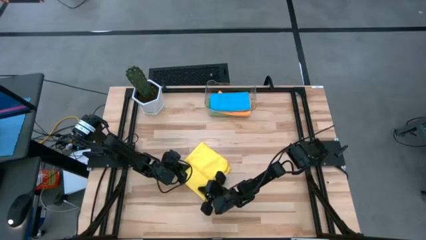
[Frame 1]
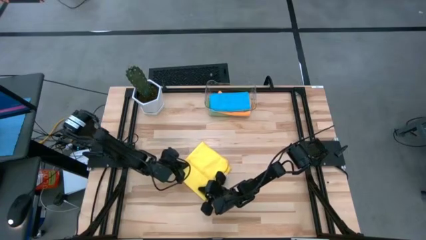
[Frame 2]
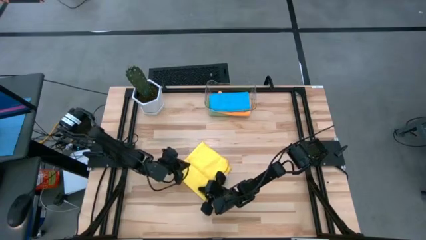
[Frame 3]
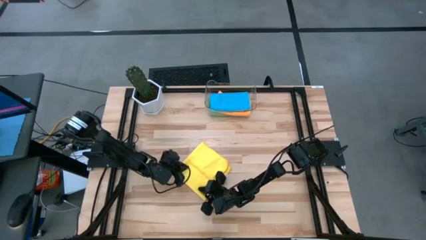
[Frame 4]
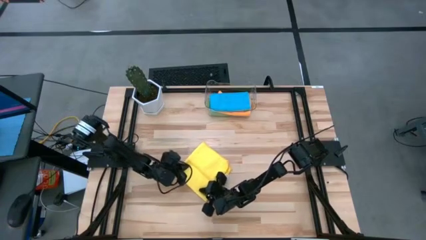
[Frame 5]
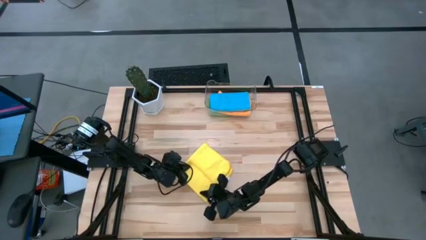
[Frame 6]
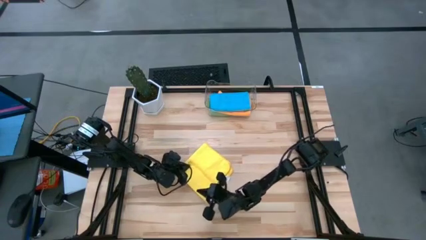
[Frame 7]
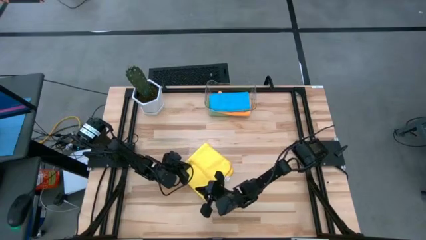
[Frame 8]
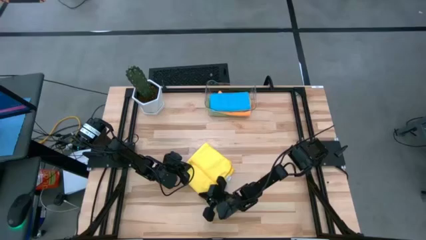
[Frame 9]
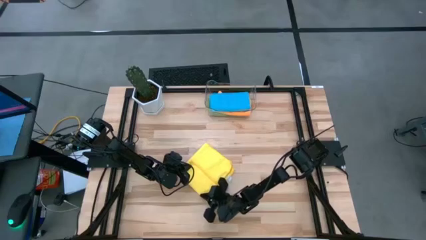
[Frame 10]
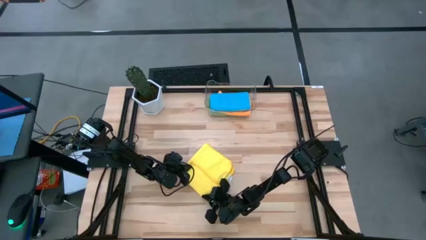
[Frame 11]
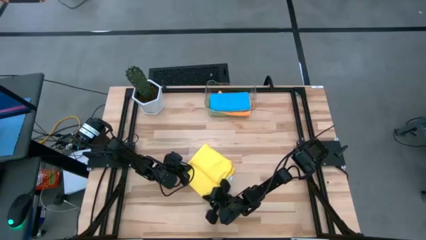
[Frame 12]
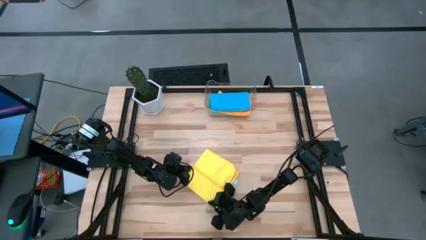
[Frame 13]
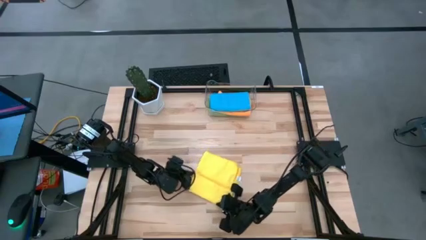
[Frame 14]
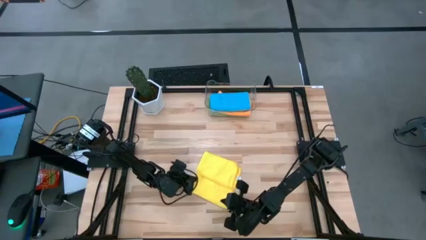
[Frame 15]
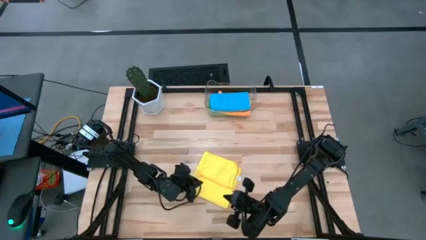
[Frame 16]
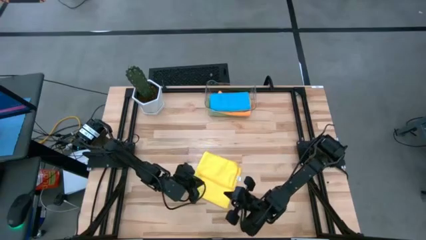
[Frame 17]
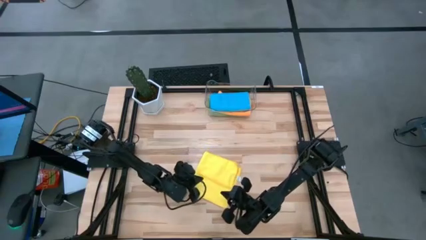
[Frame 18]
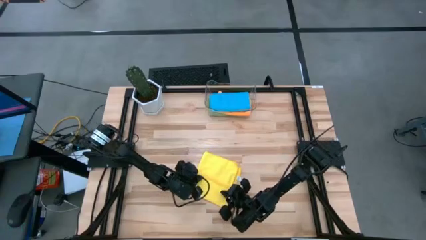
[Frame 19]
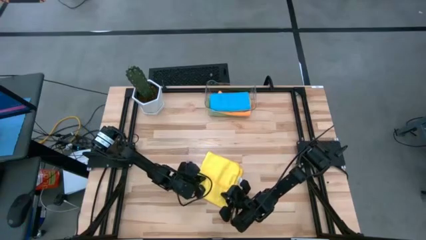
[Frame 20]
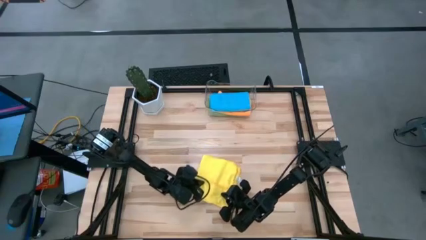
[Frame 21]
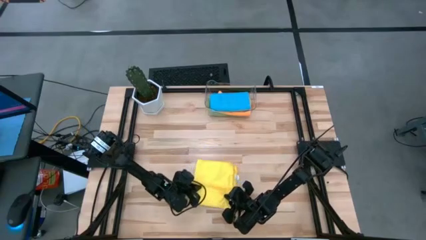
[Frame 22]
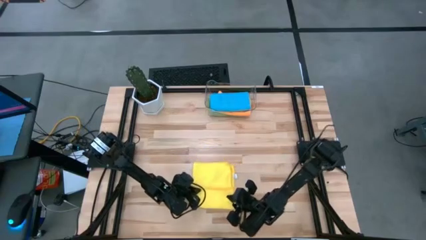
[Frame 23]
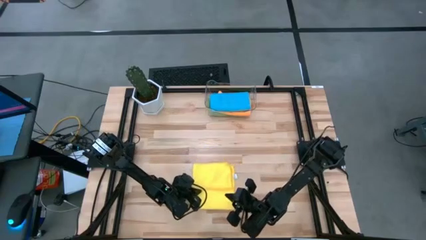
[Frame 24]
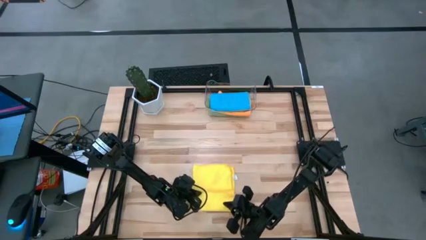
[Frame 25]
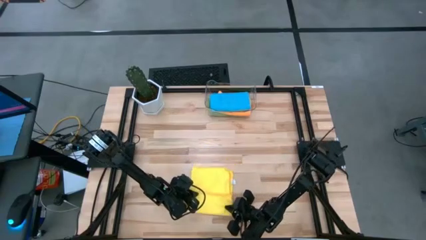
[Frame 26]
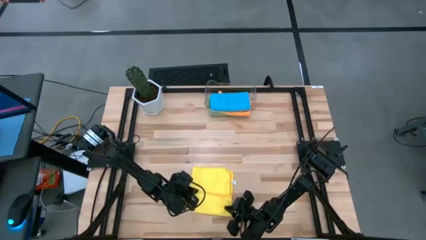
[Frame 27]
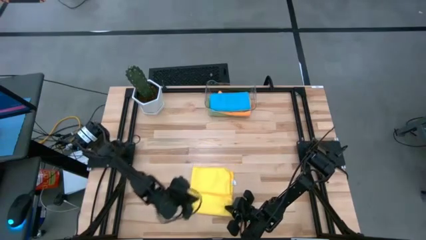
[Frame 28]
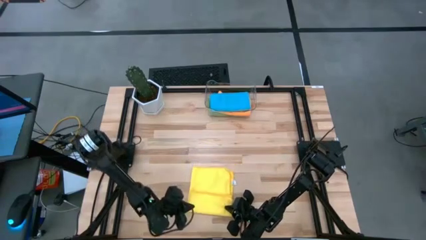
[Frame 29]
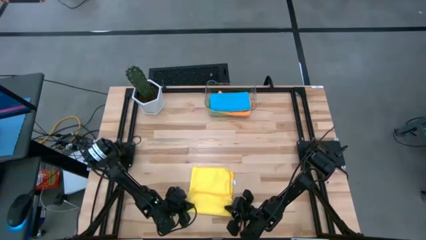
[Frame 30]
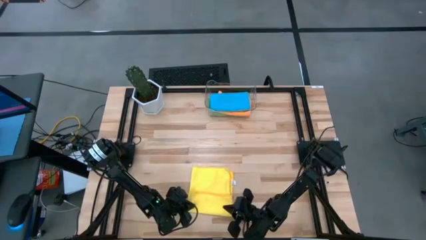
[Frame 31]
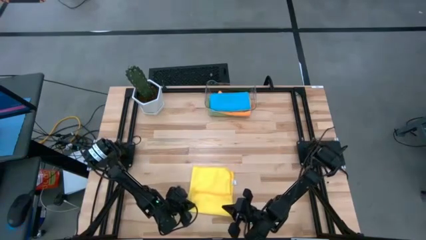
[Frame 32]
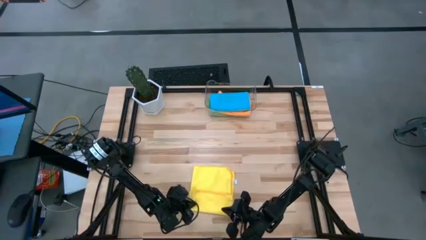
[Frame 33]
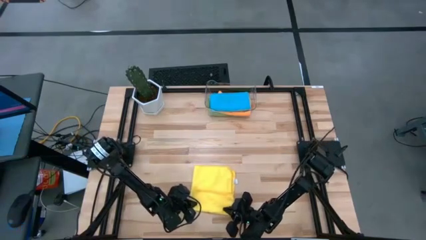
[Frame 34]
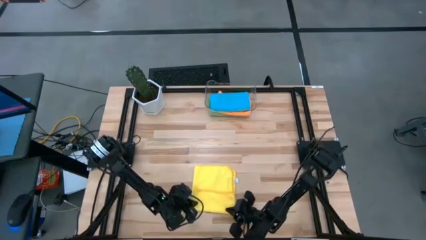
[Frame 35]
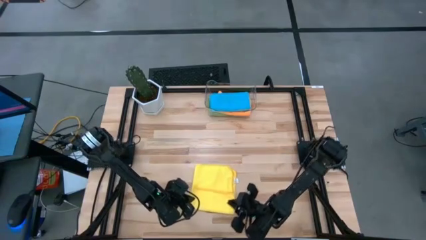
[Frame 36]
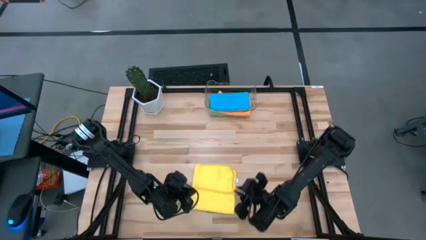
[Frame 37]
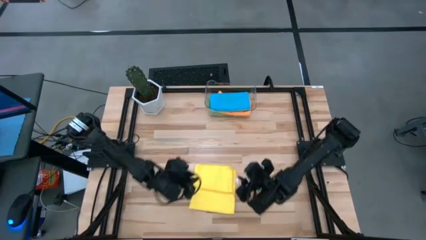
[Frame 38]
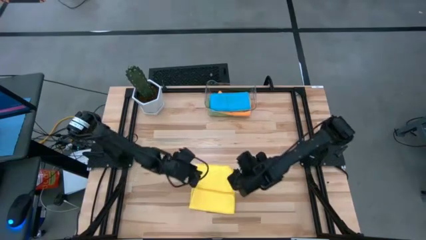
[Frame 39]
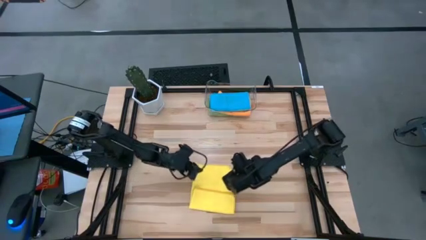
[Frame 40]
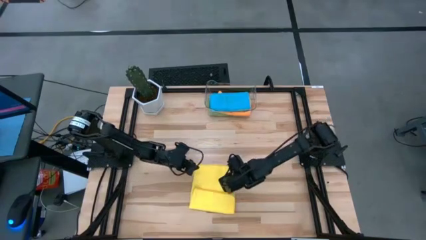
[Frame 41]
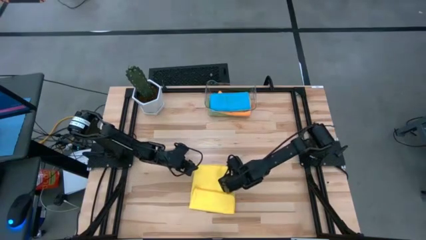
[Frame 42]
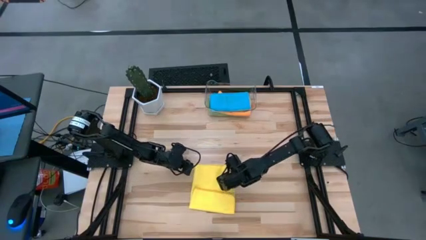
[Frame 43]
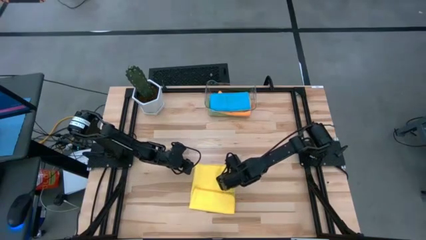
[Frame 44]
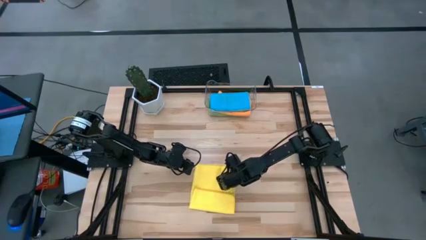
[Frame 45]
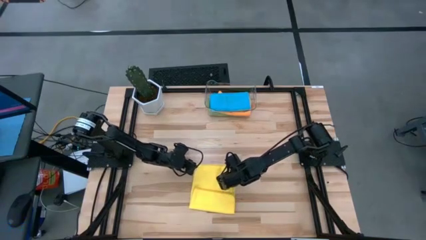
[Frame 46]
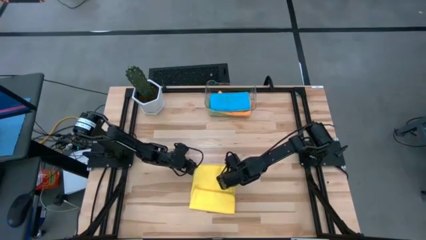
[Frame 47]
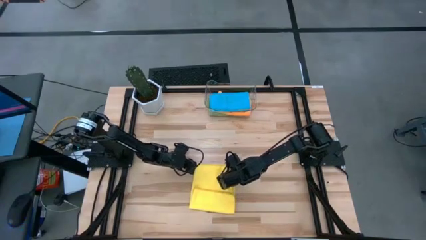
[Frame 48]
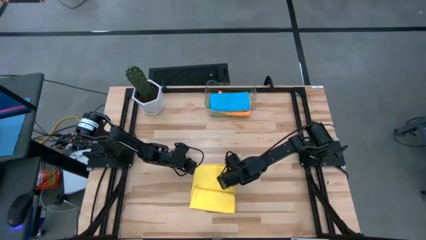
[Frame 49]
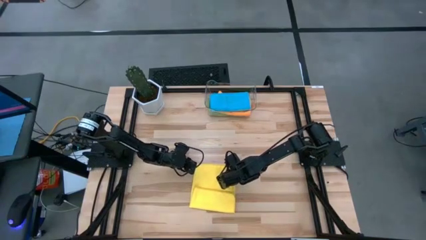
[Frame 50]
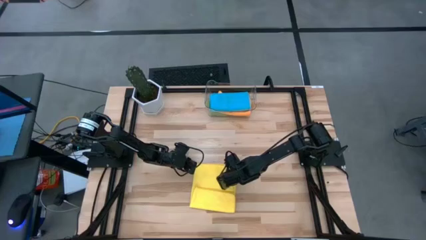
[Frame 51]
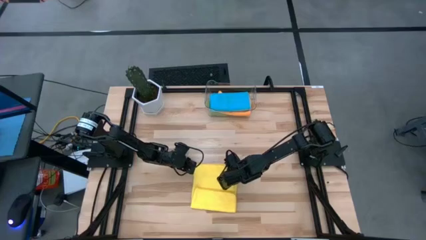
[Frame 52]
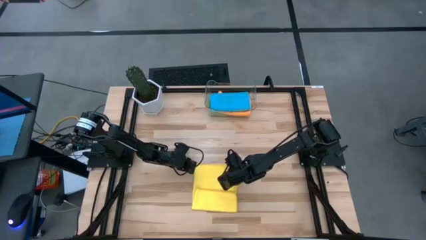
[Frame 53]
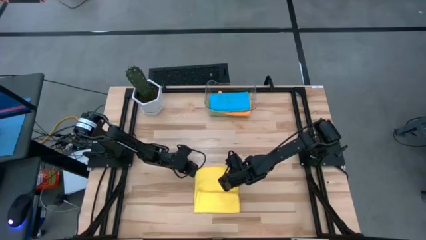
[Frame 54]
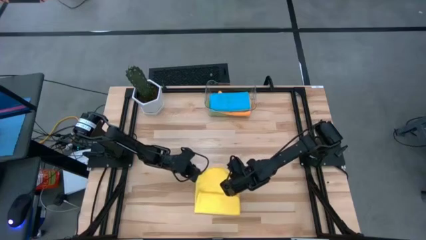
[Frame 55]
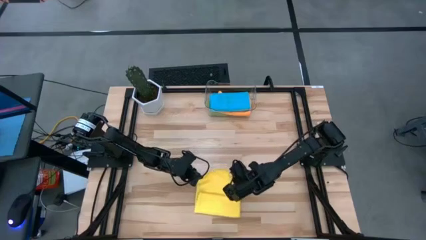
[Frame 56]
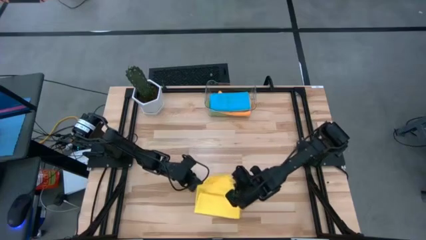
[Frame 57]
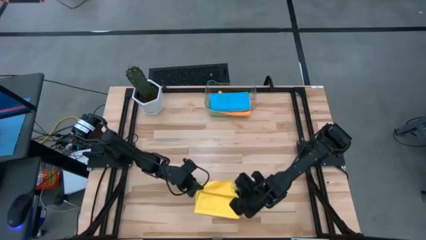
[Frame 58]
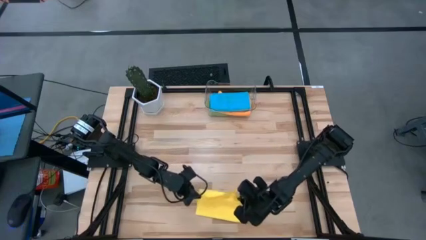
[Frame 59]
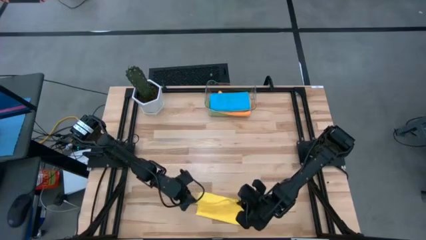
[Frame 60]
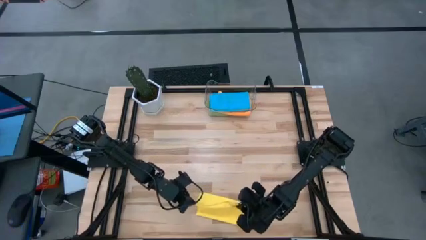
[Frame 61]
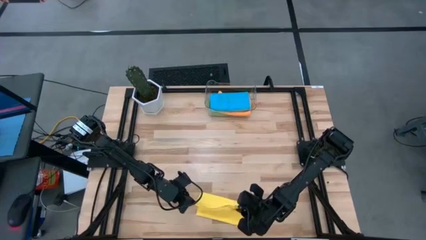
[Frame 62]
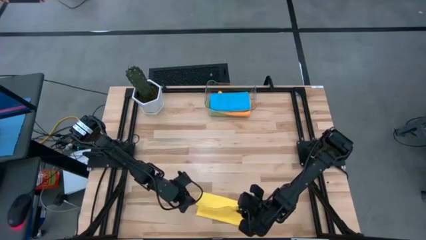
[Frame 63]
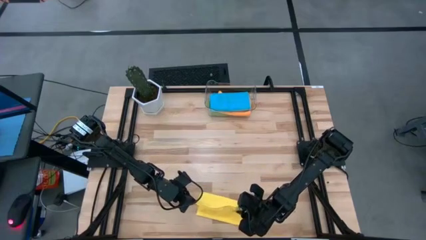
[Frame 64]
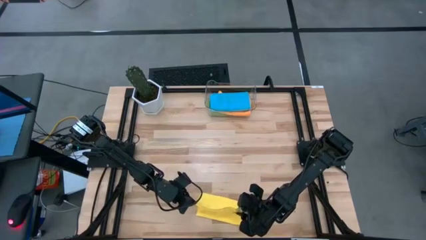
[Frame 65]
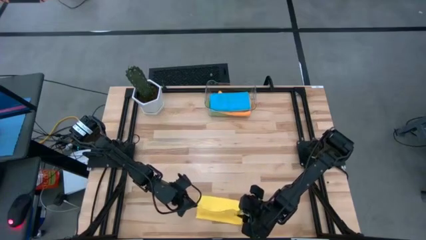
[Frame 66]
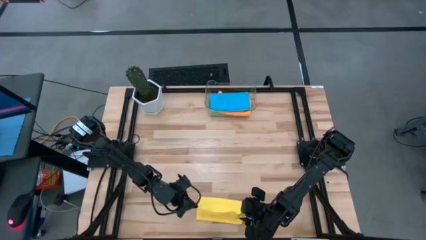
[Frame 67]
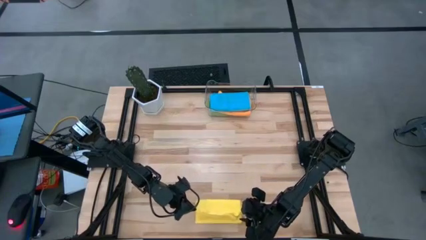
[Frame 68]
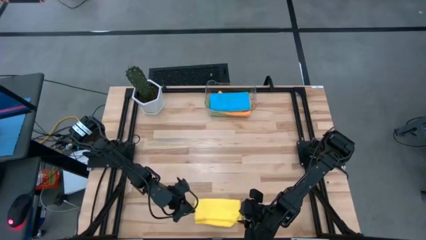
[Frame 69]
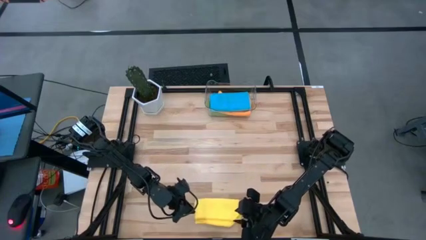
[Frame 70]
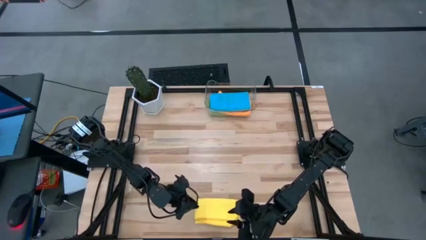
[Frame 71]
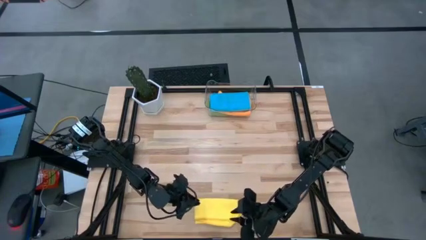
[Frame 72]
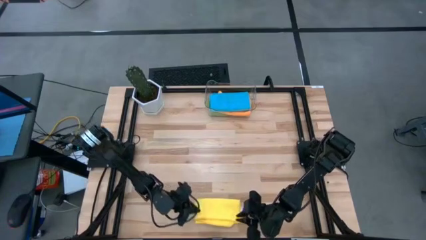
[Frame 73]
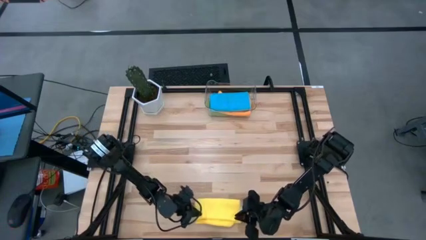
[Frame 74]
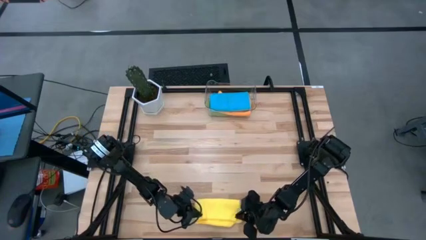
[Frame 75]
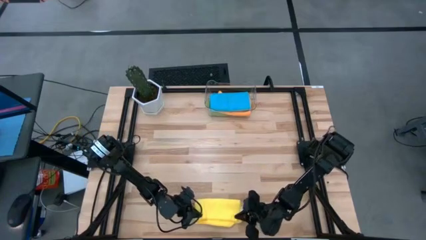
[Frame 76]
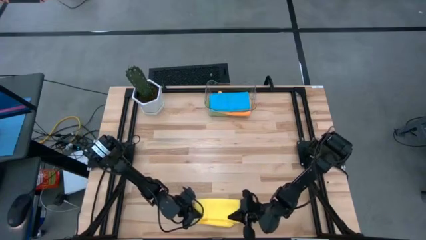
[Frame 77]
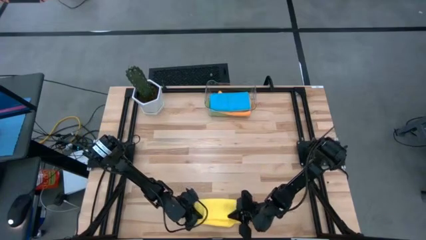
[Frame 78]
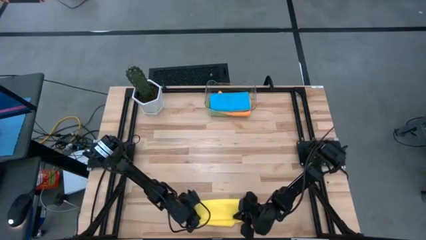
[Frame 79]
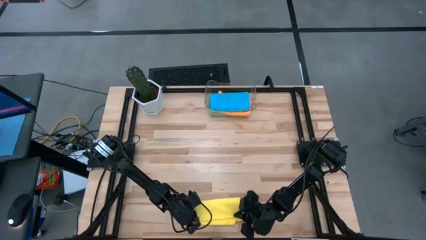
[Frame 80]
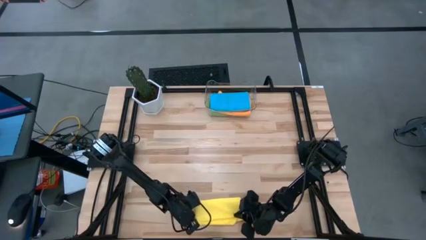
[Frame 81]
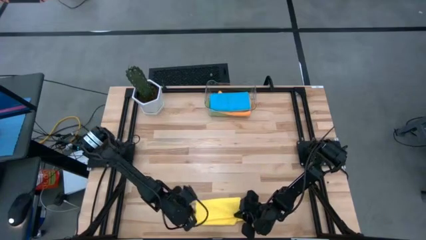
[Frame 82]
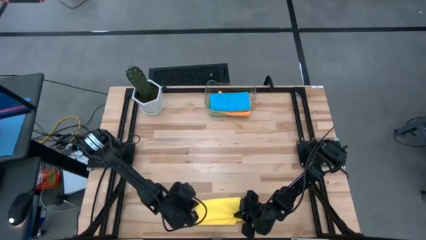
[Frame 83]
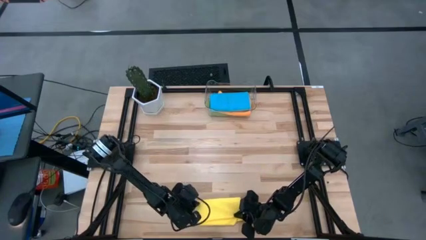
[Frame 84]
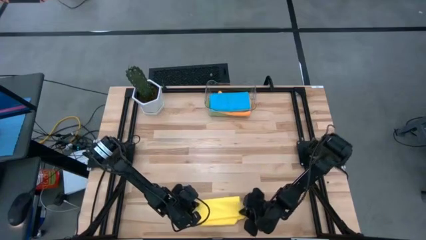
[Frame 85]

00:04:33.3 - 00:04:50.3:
Task: Fold microfiber towels
Fold the yellow towel
